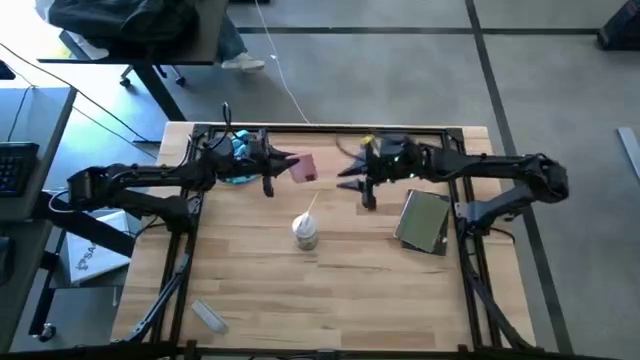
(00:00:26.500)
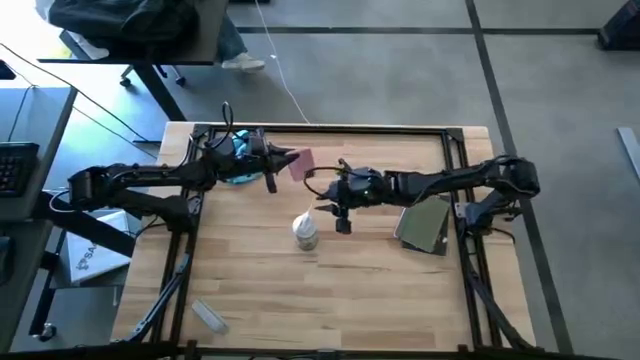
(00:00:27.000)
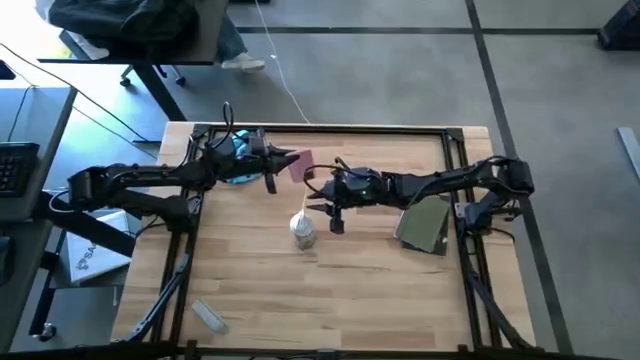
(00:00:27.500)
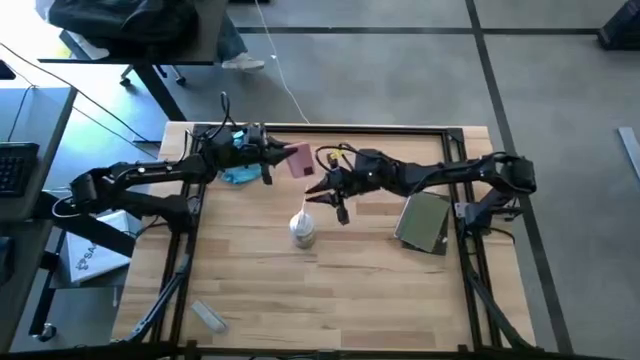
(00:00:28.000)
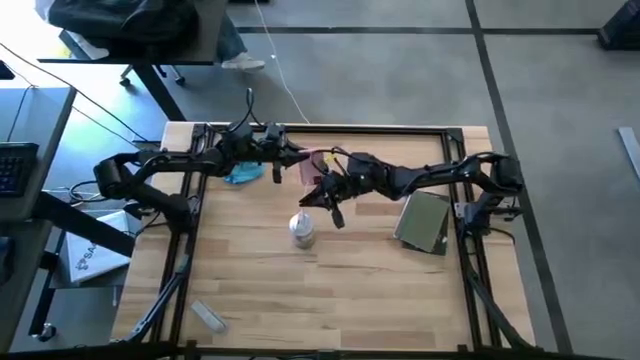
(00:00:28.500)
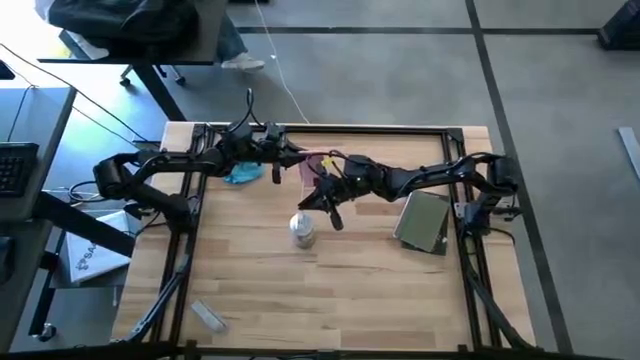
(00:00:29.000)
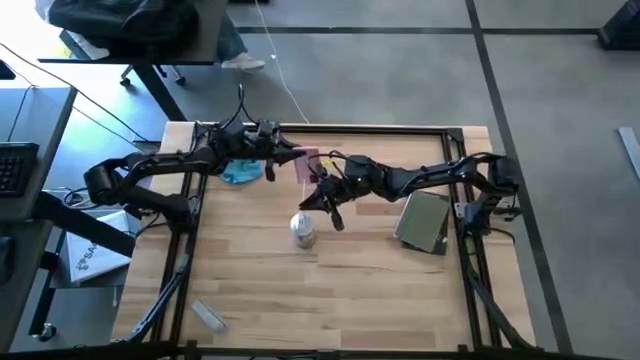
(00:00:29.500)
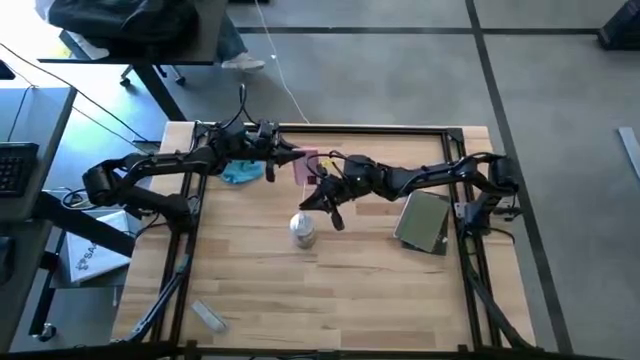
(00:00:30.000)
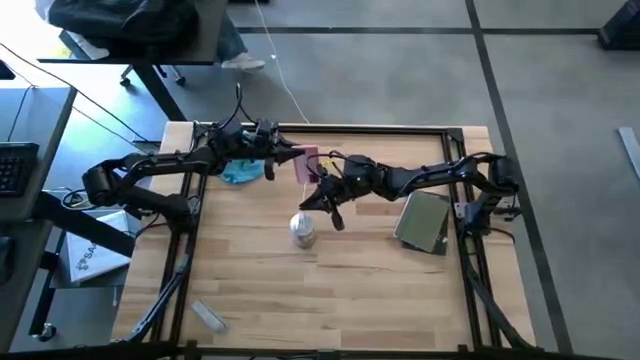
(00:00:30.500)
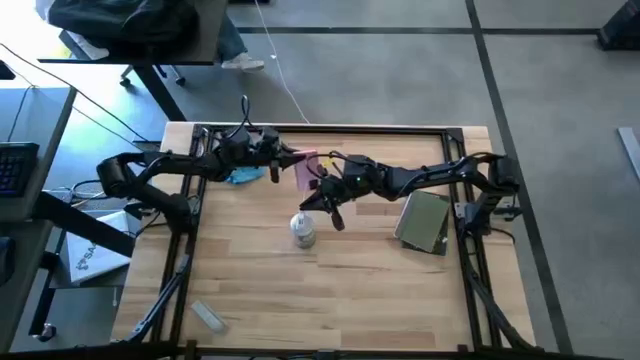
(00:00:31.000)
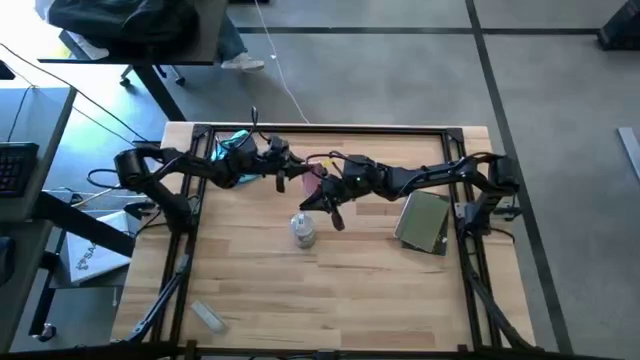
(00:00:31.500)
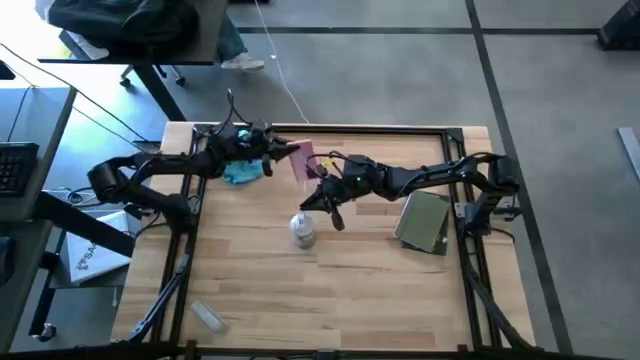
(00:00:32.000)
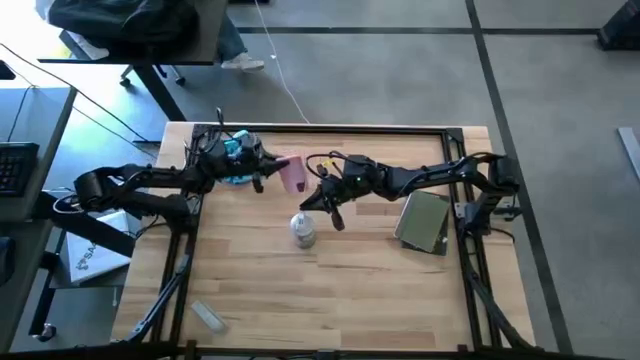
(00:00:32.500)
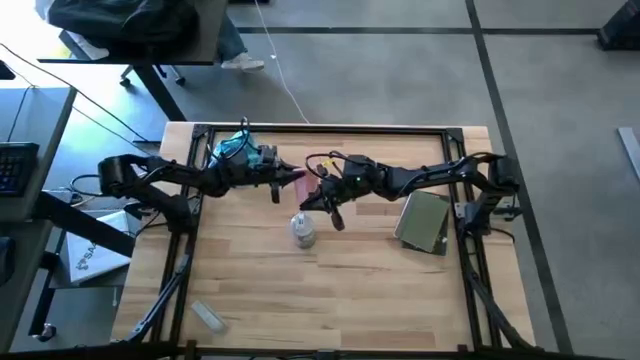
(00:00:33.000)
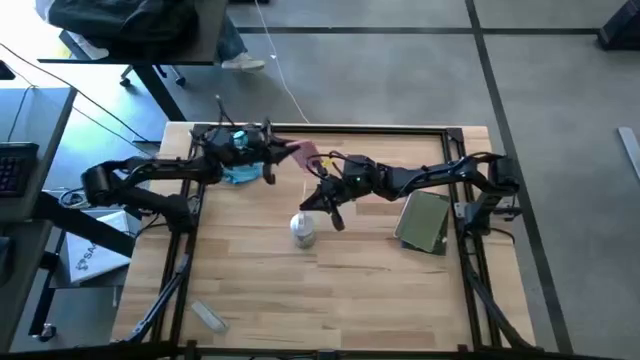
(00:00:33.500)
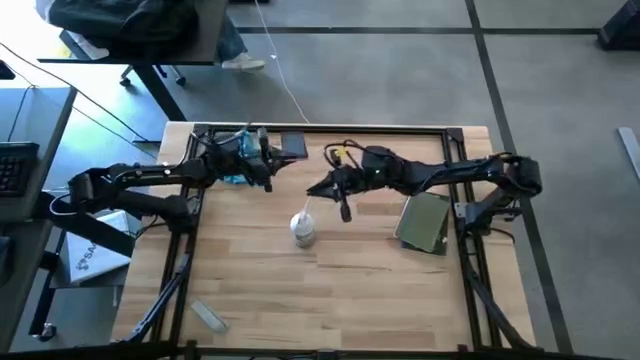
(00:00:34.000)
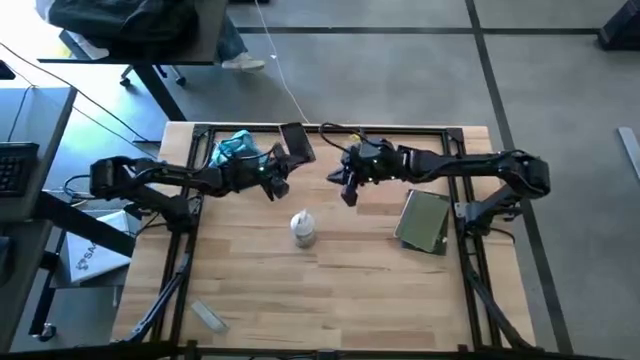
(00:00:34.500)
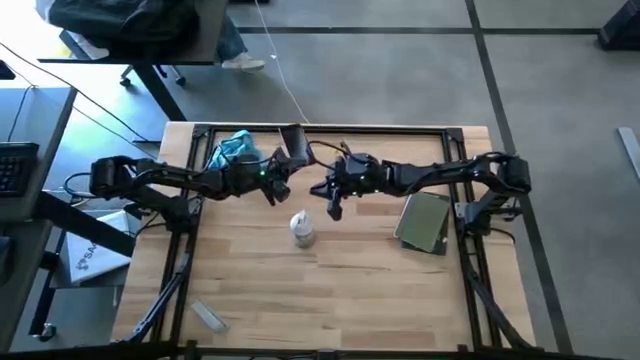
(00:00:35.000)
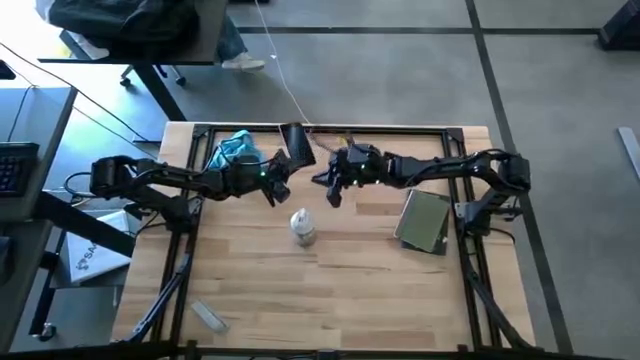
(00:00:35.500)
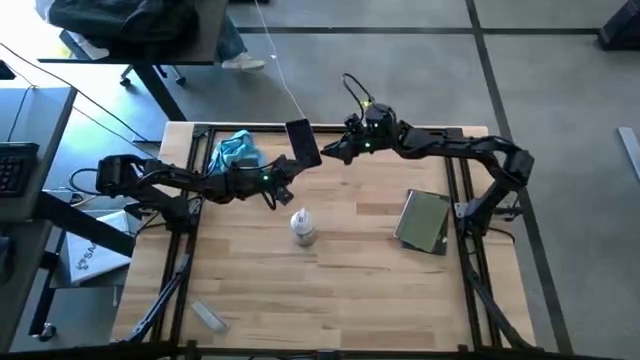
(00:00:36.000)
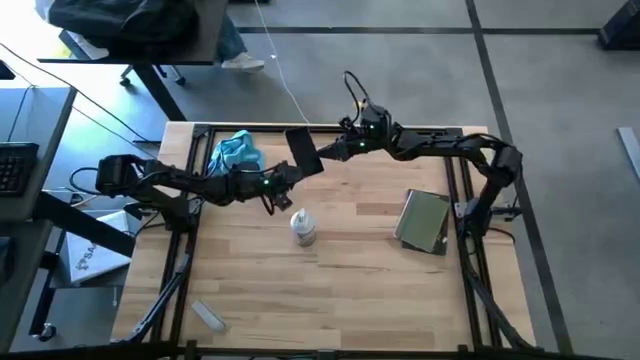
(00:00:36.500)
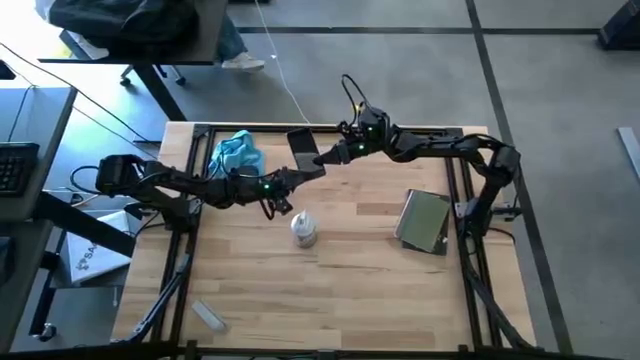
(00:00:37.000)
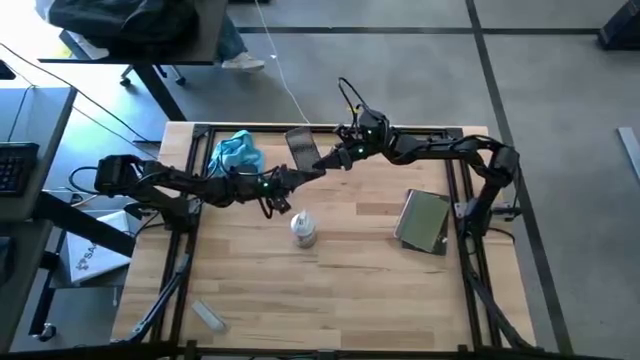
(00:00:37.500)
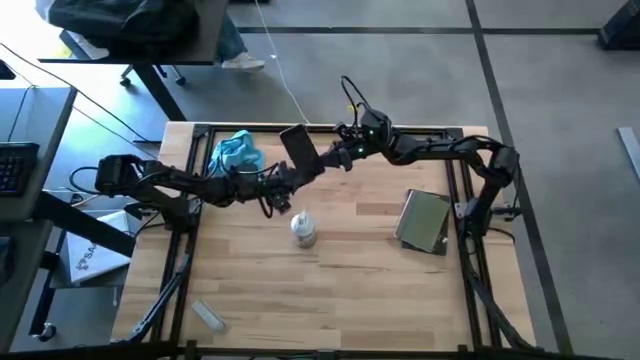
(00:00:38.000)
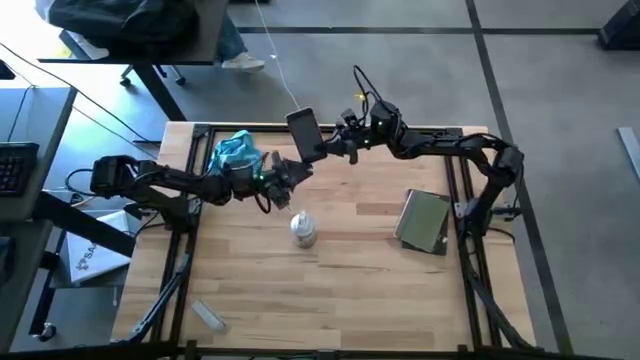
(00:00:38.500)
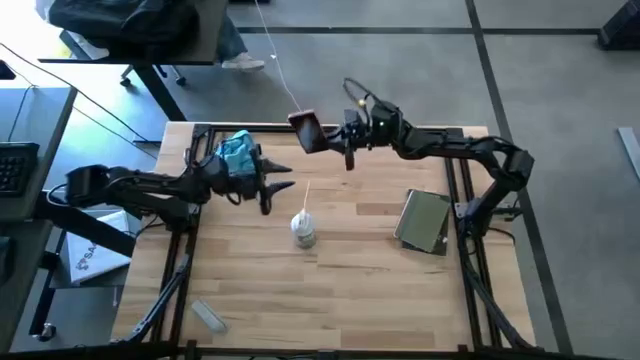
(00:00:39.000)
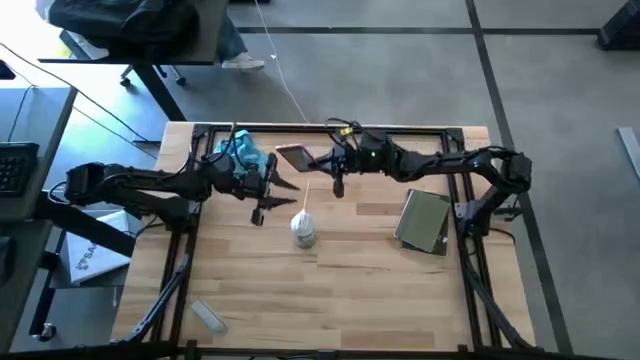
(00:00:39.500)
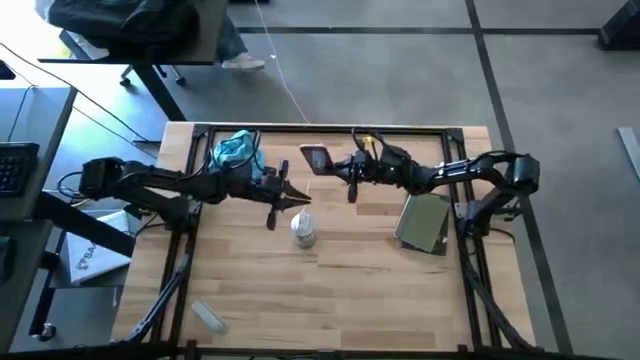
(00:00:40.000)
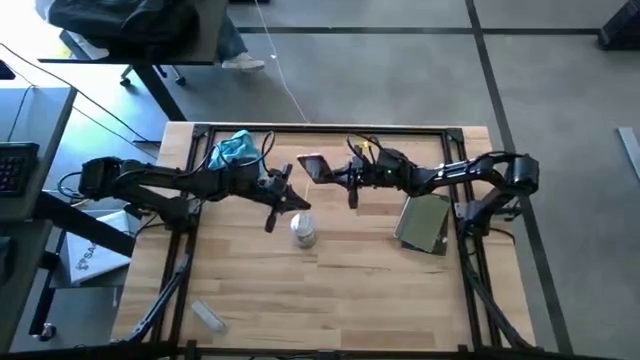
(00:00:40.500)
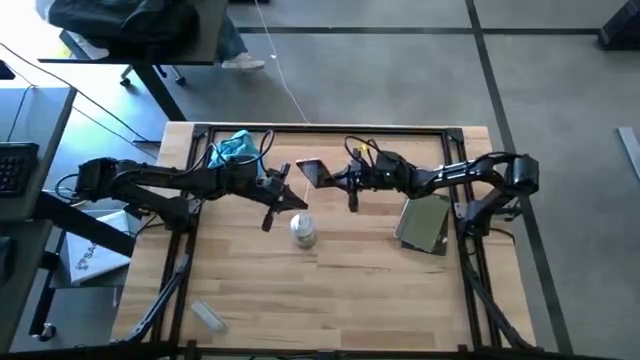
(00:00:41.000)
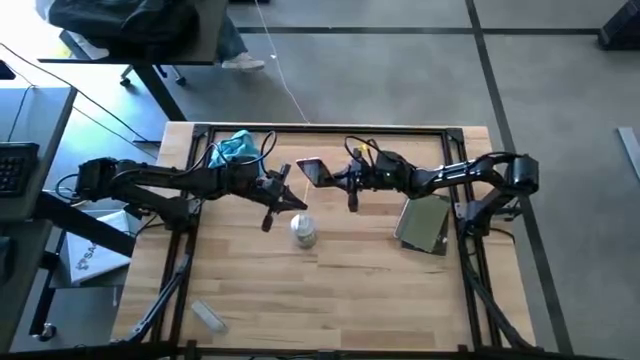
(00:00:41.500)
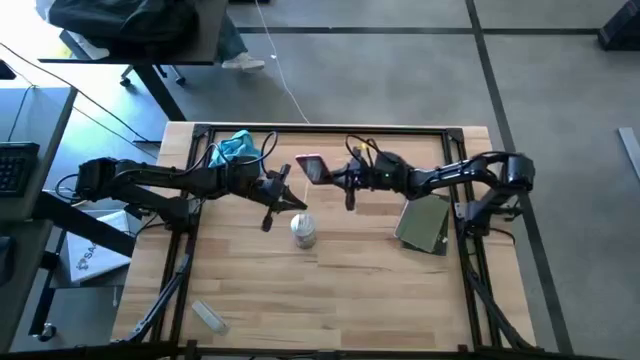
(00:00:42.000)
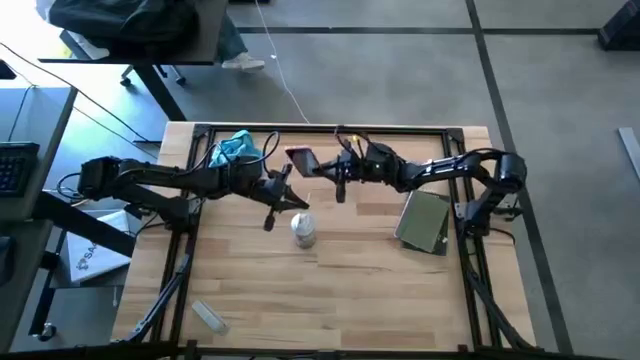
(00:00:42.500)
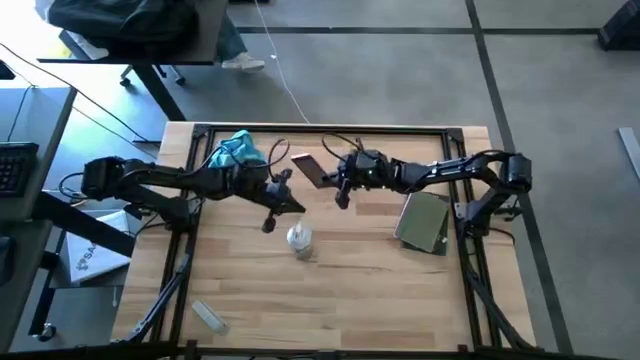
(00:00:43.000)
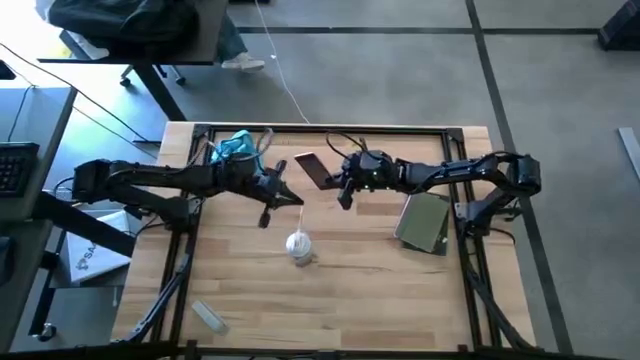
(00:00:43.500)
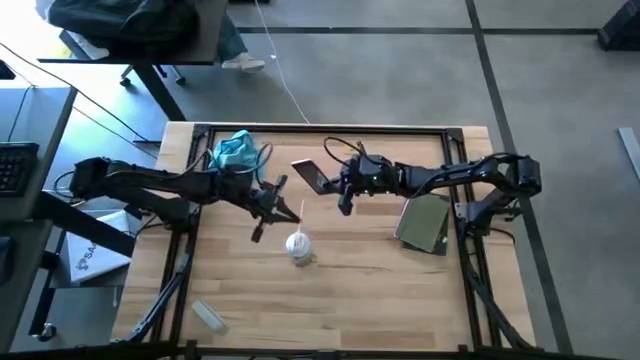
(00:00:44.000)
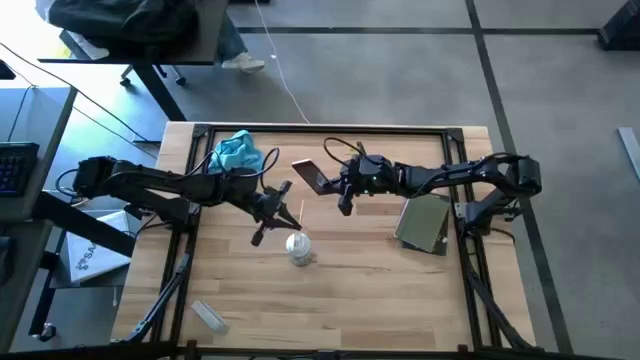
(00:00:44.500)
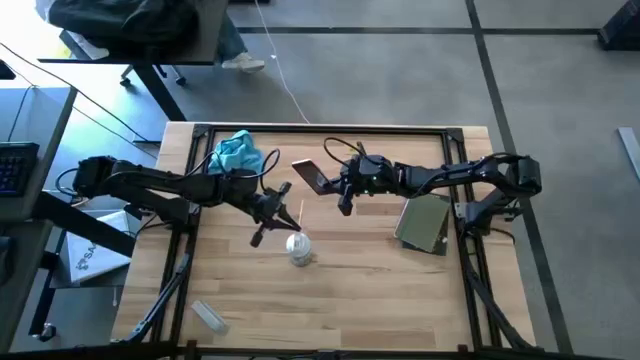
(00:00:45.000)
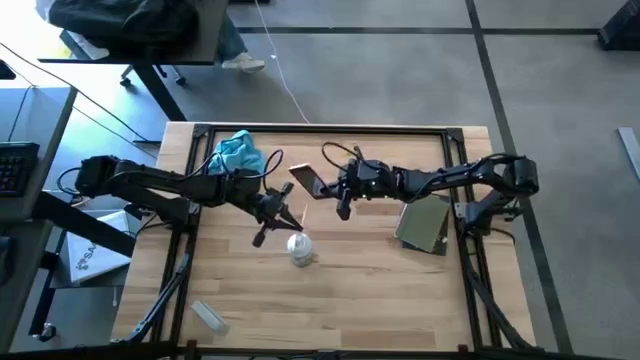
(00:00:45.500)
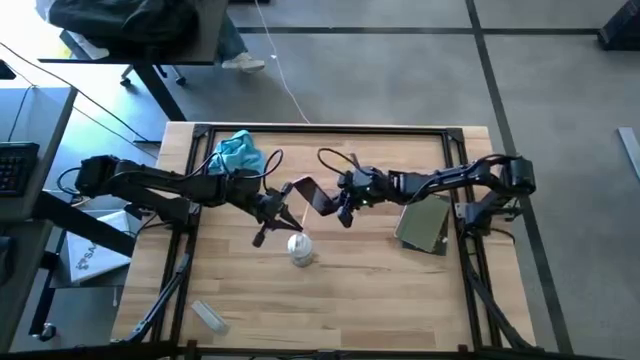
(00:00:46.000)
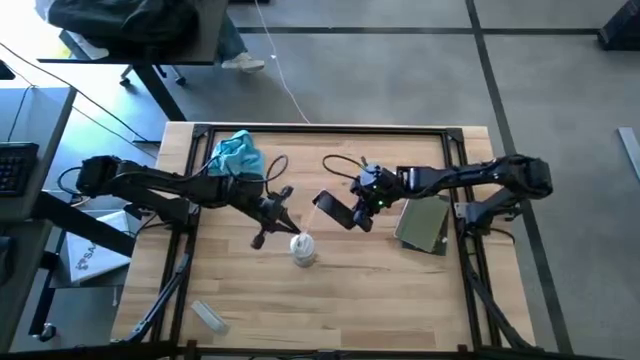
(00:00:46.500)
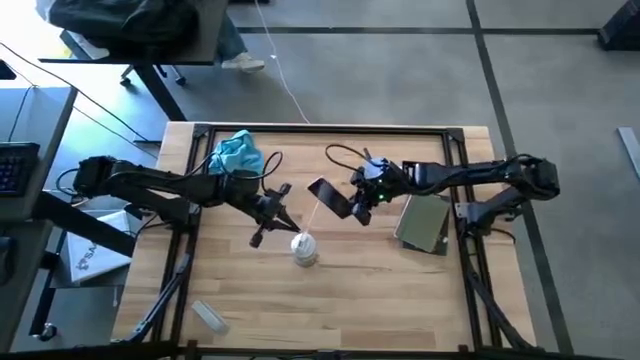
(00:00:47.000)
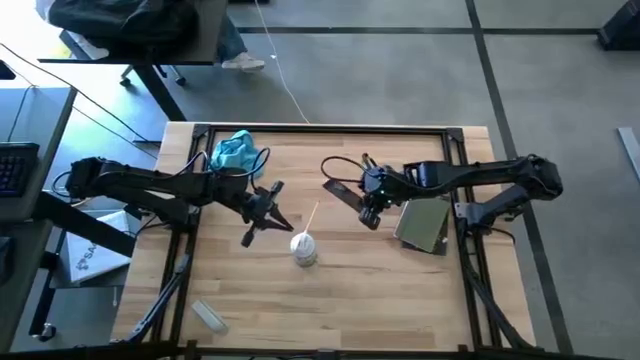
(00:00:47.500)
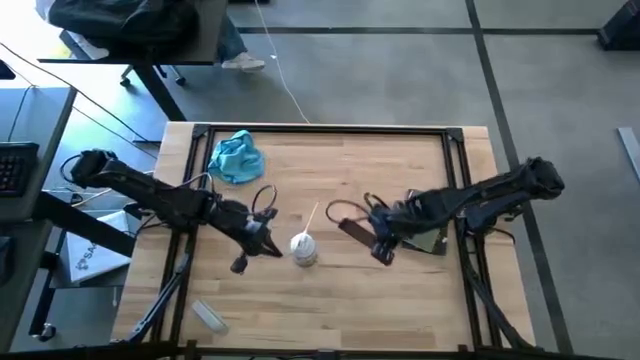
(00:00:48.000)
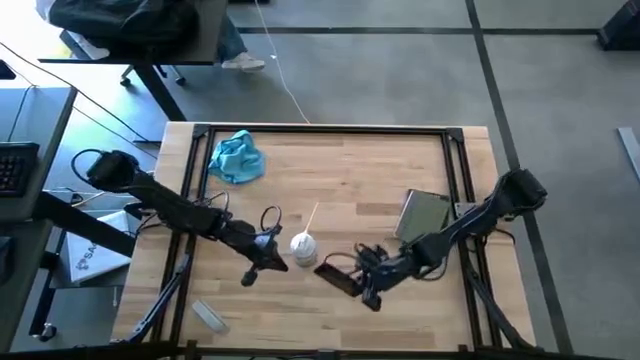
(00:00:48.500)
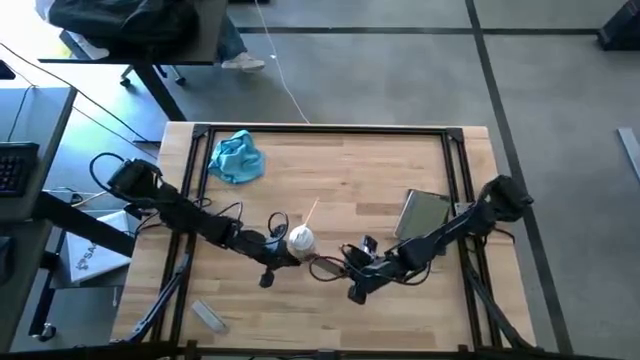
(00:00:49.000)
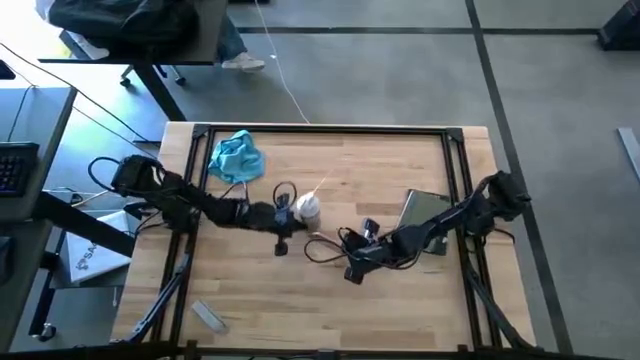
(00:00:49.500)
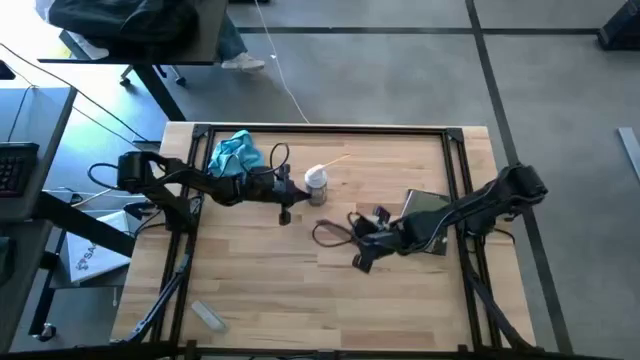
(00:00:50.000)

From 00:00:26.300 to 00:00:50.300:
Task: Apply microfiber cloth
Spray the back and front of the pink cellphone using the blue spray bottle
